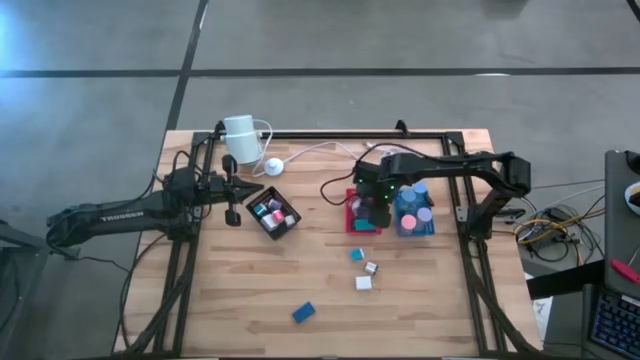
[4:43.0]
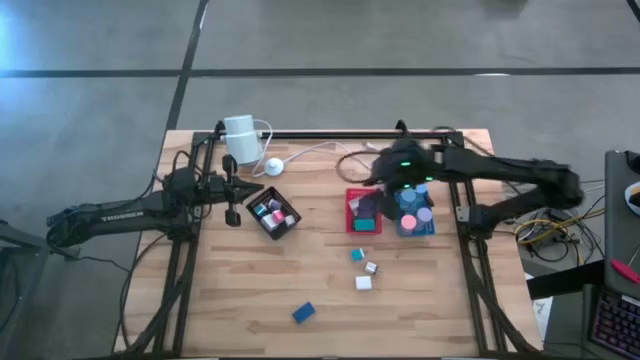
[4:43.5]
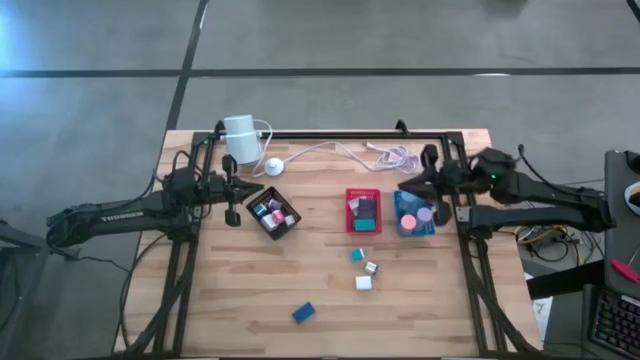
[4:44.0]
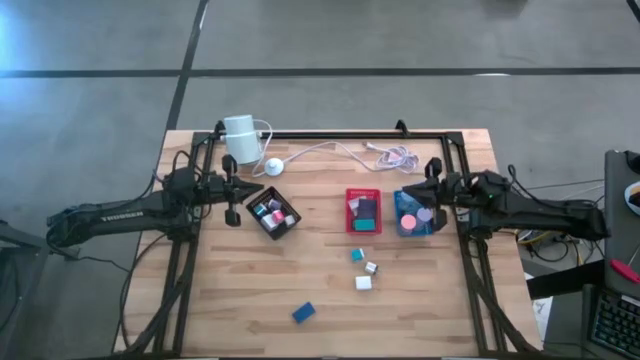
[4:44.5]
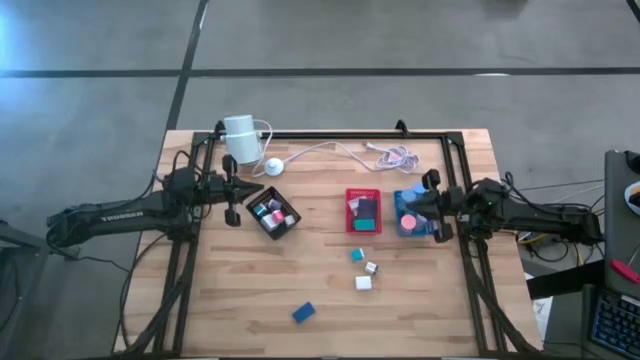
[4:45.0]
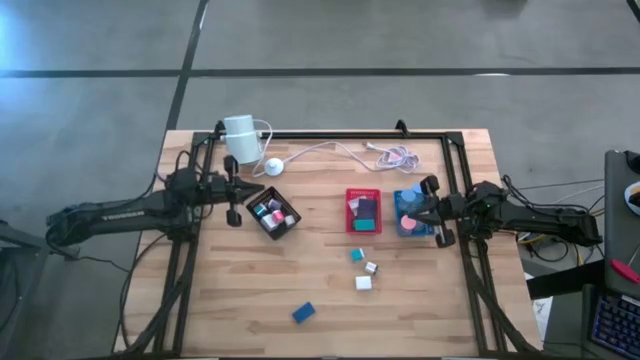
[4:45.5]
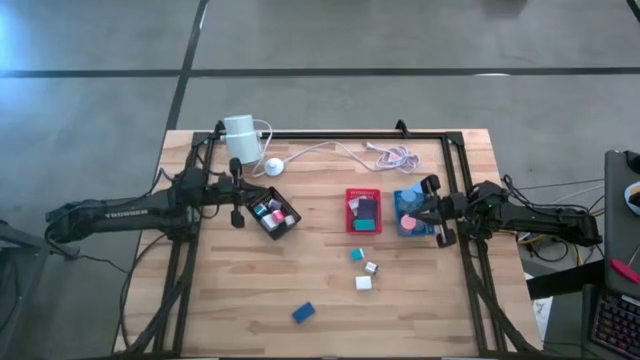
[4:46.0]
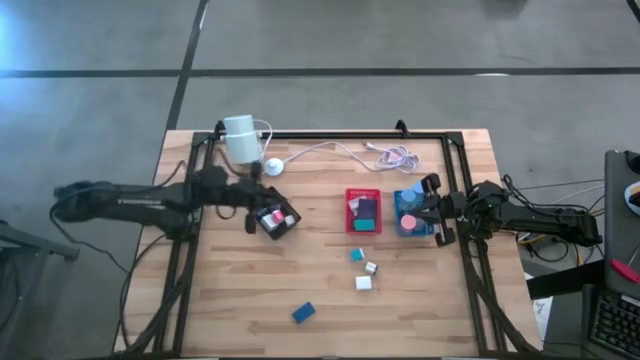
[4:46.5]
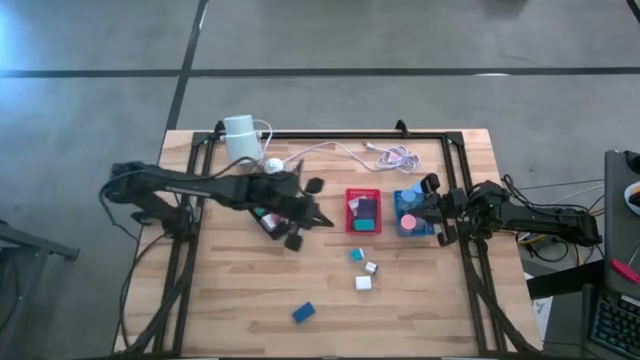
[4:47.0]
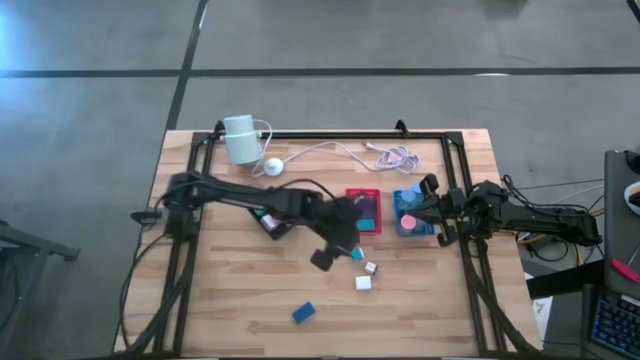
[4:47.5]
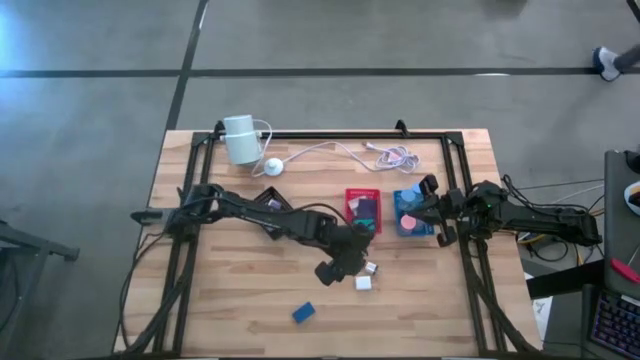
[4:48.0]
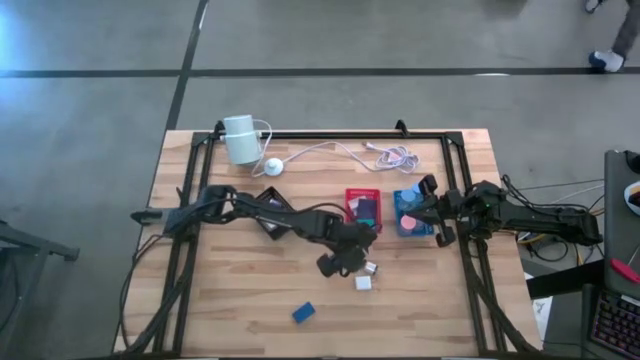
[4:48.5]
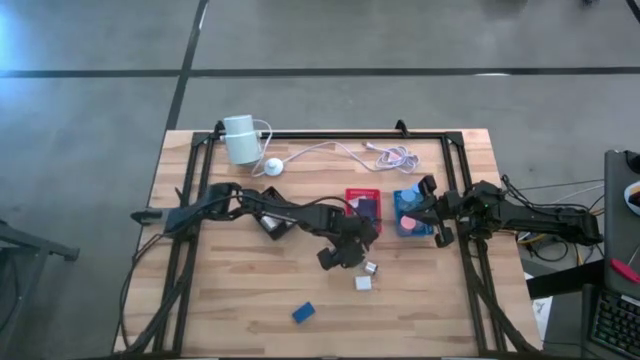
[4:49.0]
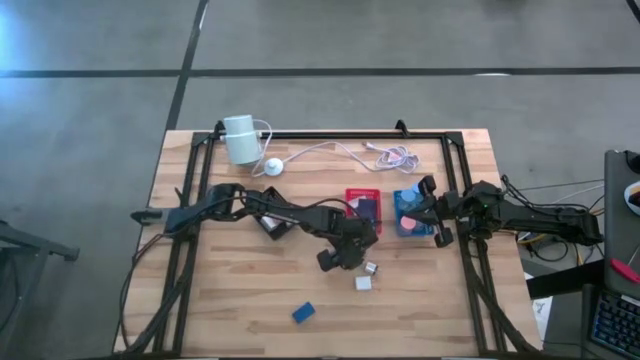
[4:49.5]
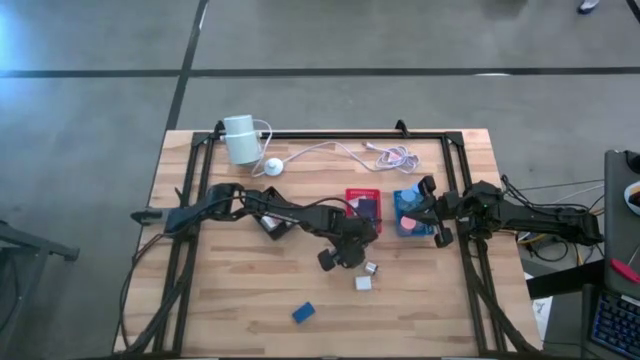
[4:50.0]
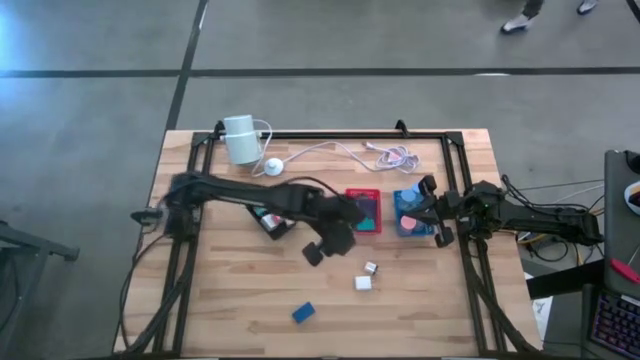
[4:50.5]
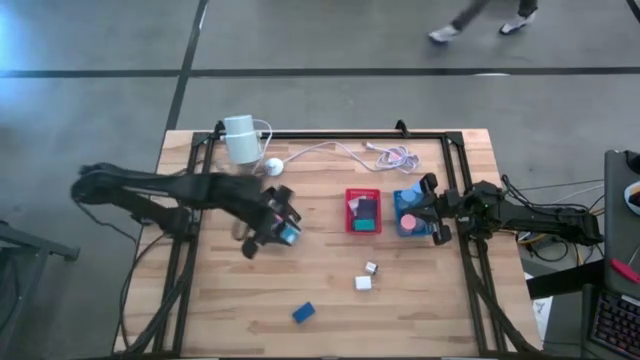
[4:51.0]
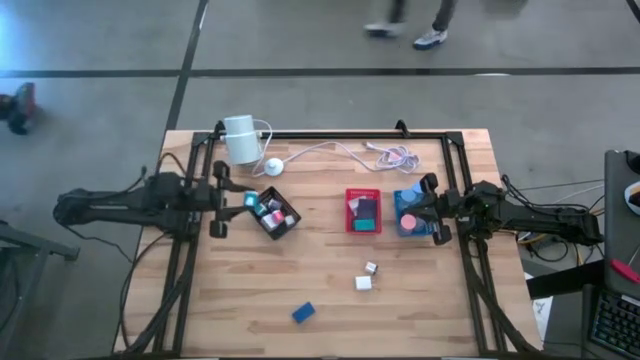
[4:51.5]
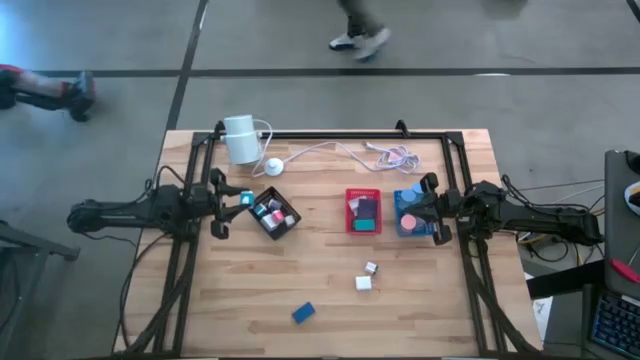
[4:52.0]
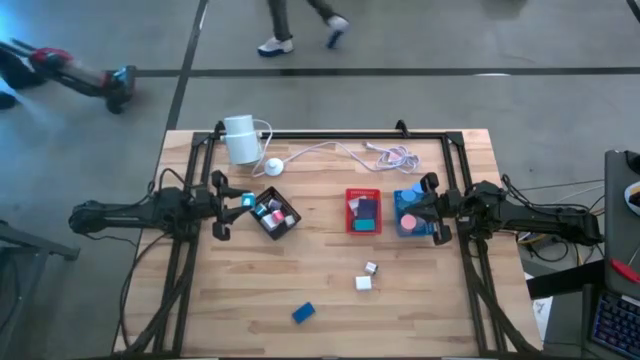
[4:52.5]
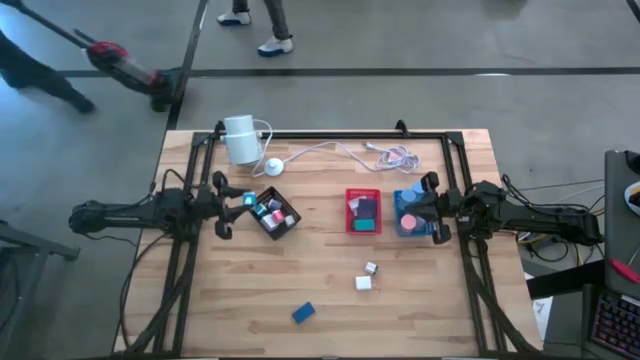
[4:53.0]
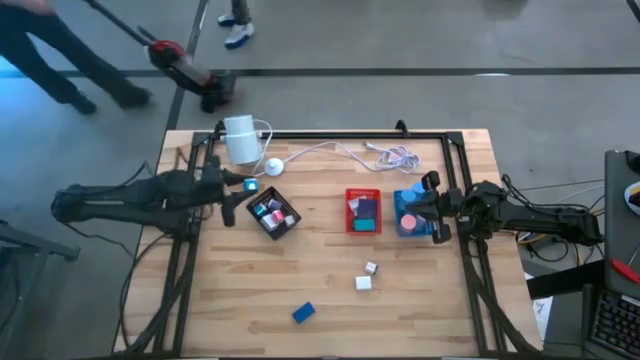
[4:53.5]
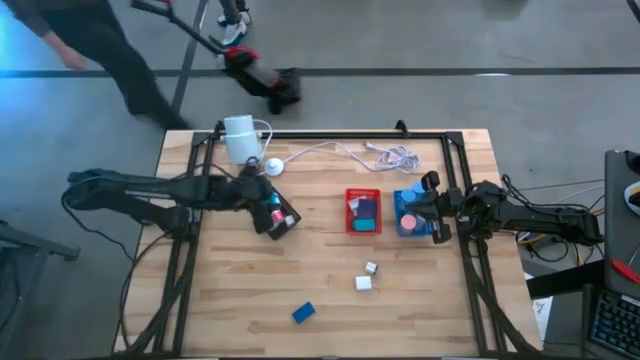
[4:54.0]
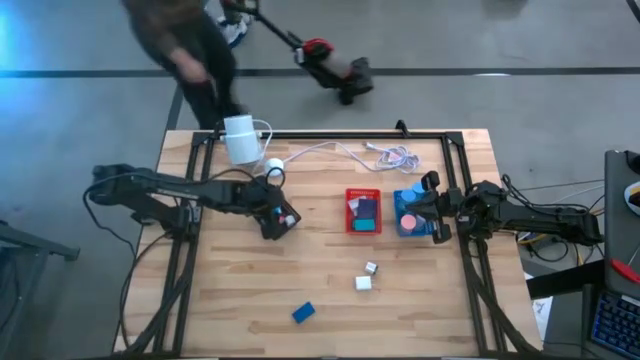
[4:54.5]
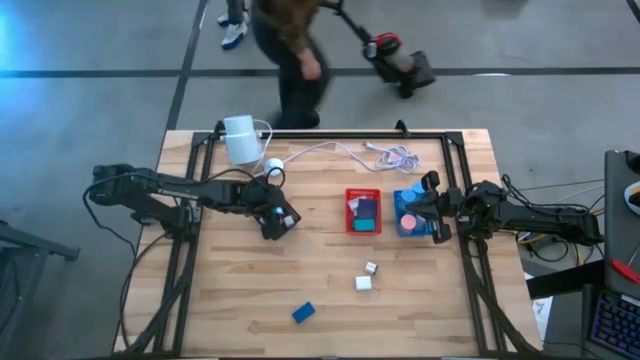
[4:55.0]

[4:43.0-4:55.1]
Task: Pick & Place Office items
Put the blue charger adaptor into the black bin

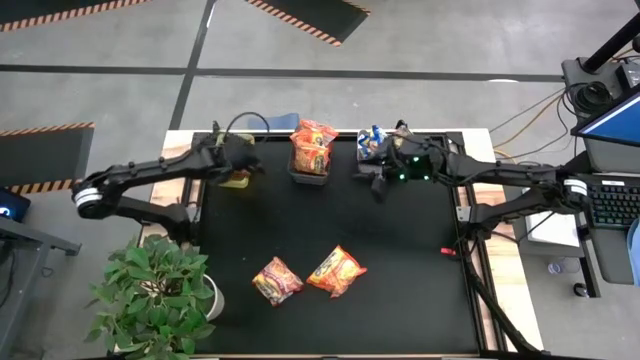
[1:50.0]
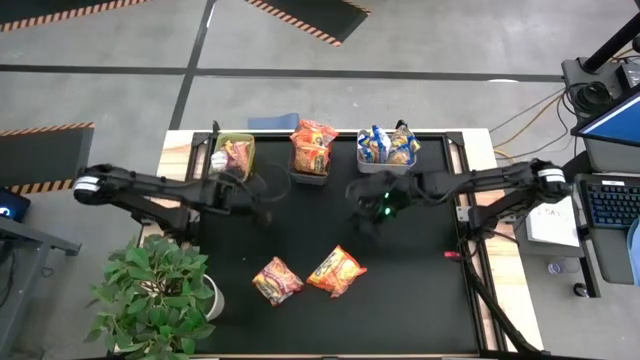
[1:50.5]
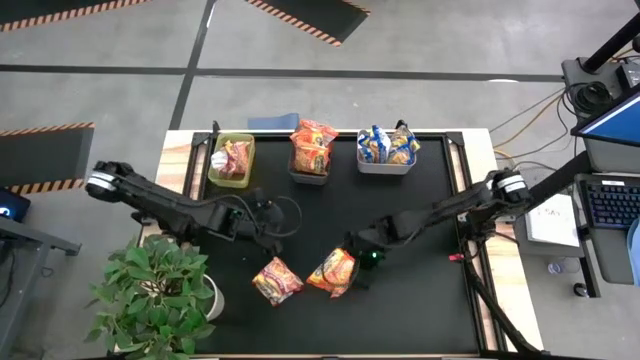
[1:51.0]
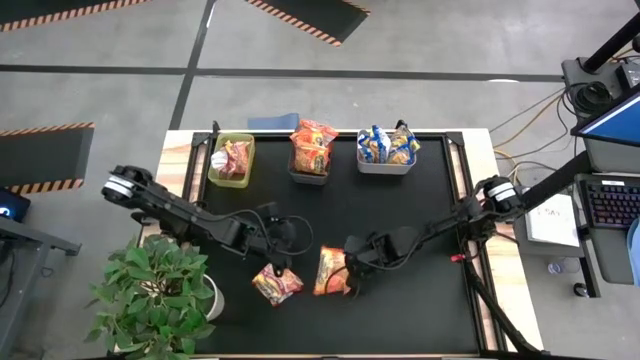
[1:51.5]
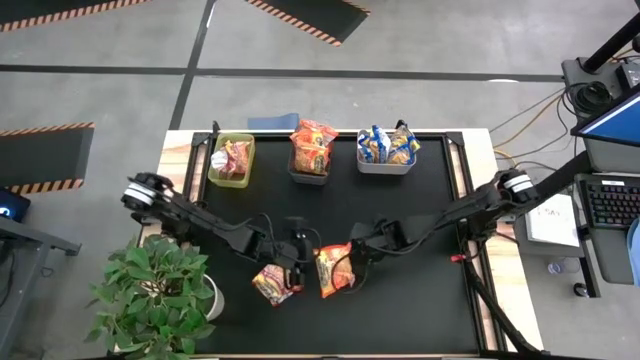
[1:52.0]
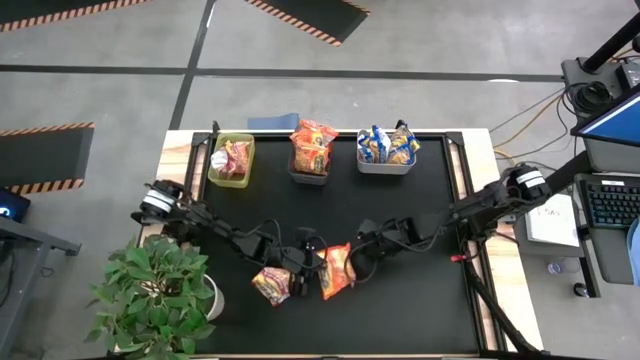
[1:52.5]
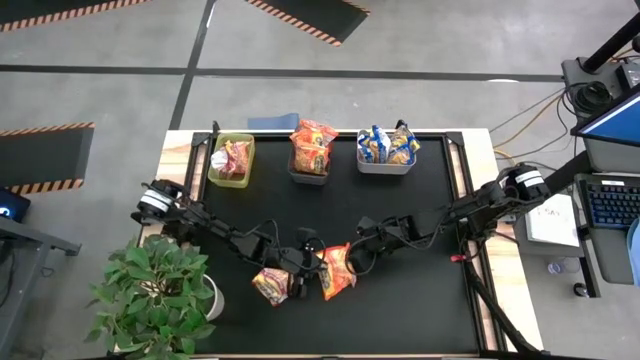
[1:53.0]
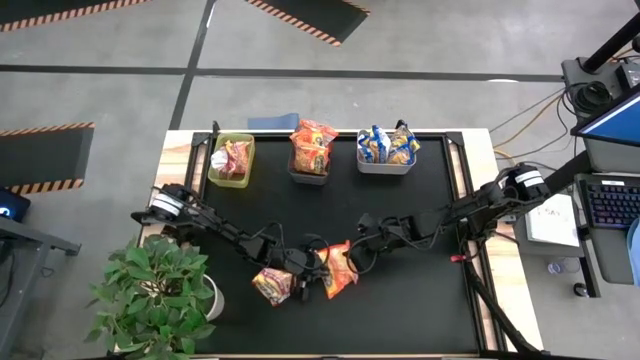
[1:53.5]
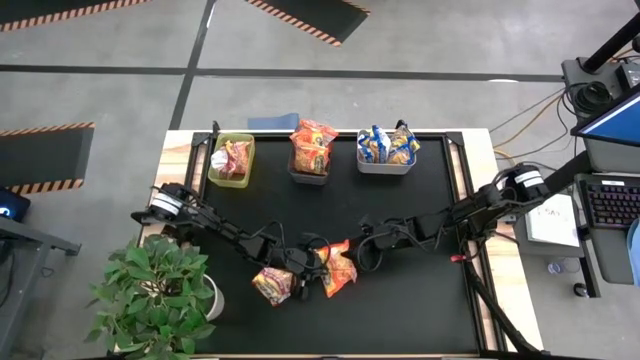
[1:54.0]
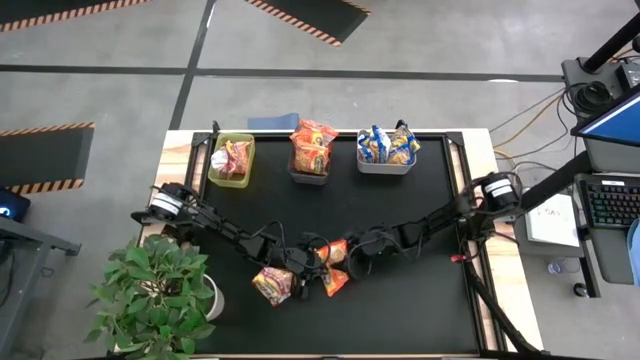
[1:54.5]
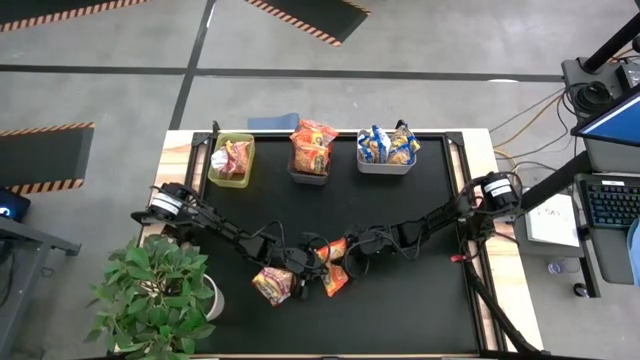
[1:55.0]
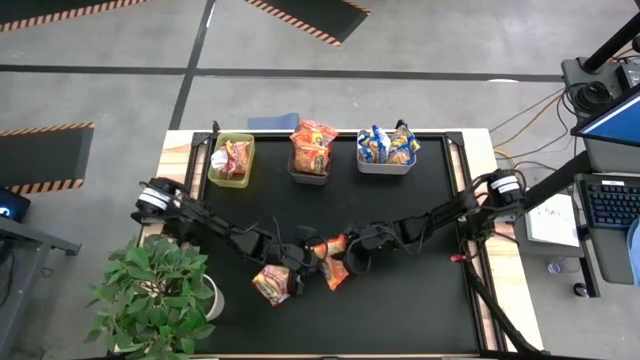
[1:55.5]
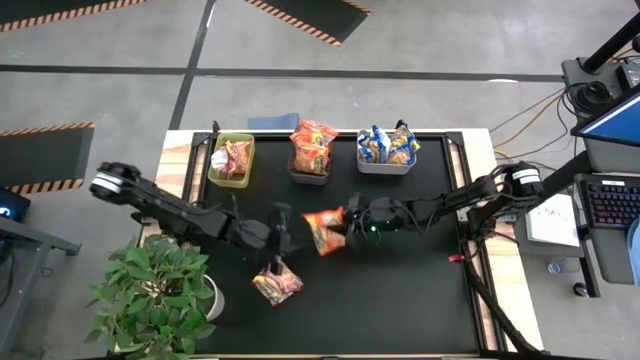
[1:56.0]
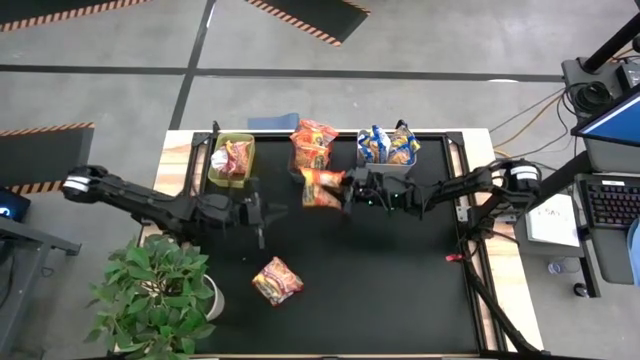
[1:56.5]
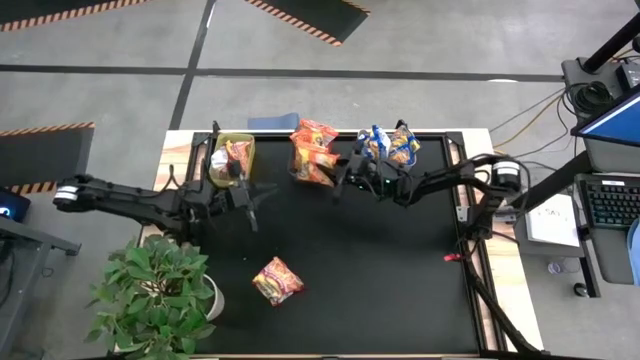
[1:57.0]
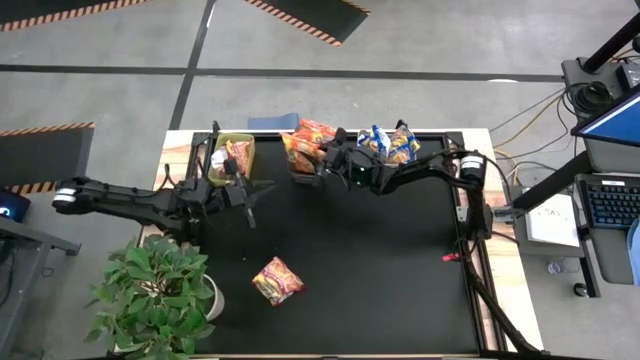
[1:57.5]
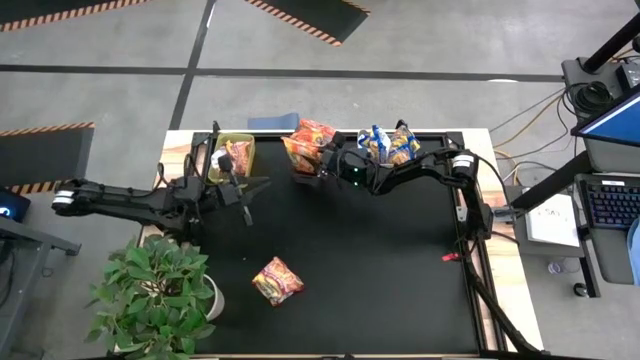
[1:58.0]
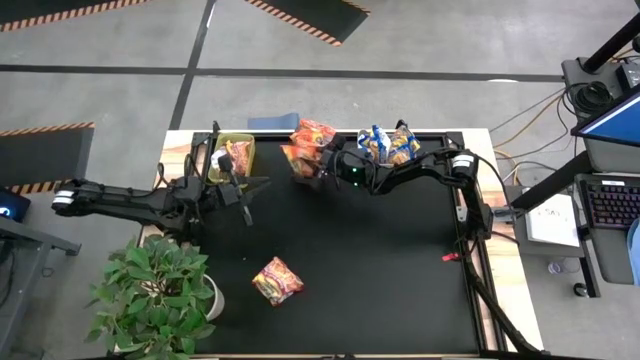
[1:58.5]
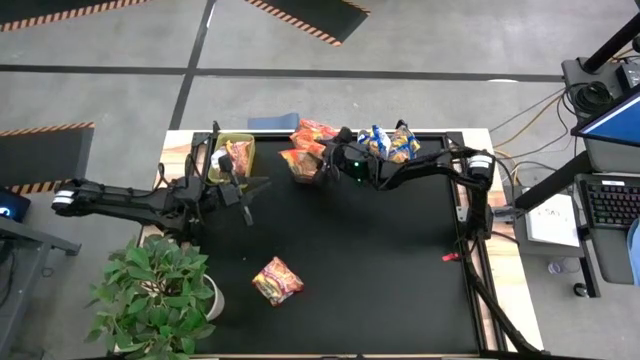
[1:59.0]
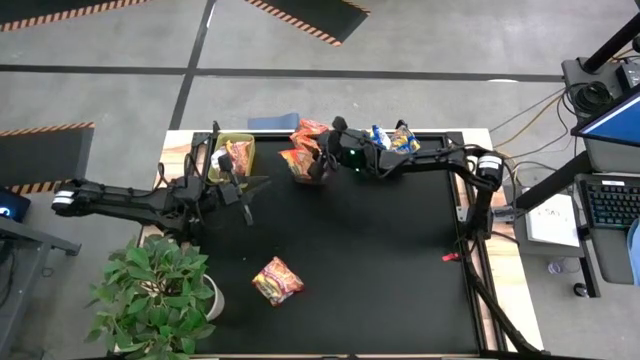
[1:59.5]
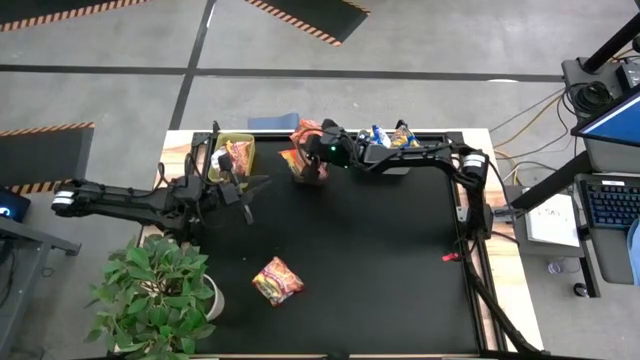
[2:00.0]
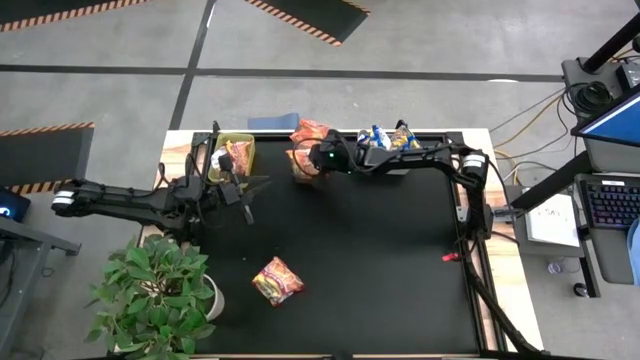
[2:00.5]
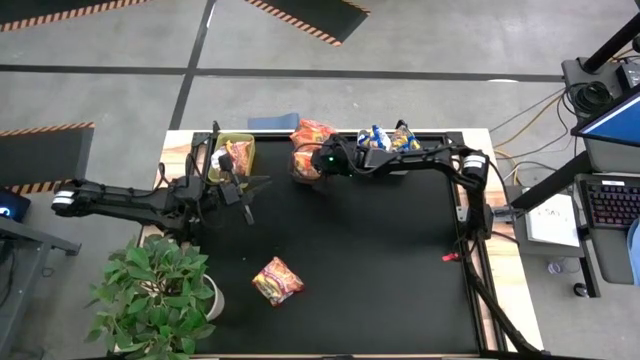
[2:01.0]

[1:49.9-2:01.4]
Task: Sort Maruchan noodles
Put the orange noodle pack into the black bin
